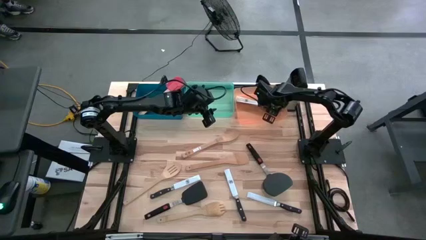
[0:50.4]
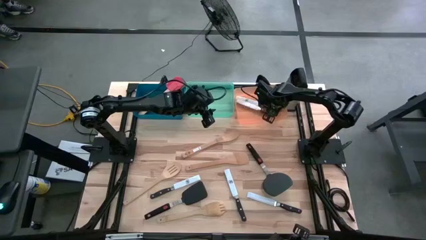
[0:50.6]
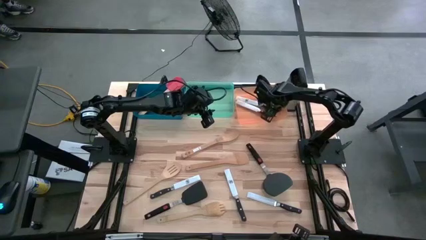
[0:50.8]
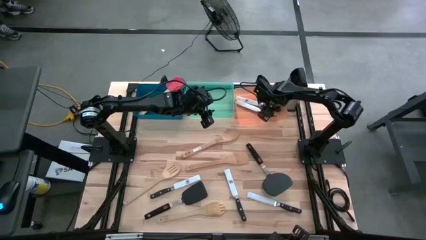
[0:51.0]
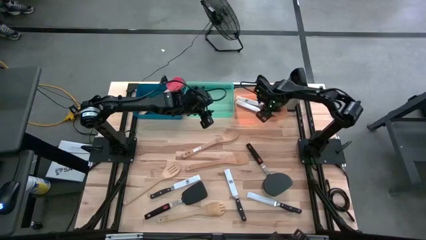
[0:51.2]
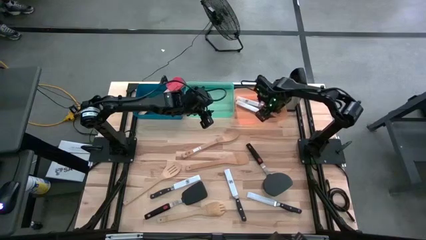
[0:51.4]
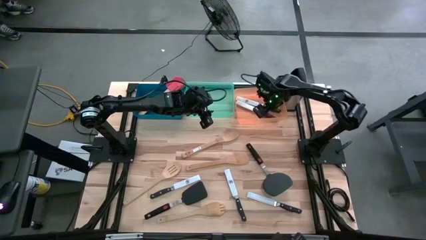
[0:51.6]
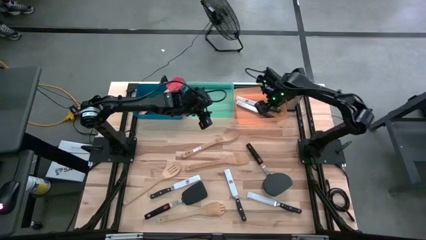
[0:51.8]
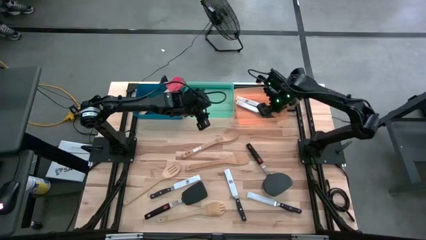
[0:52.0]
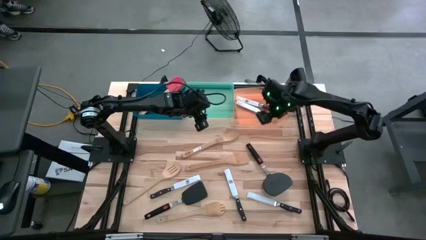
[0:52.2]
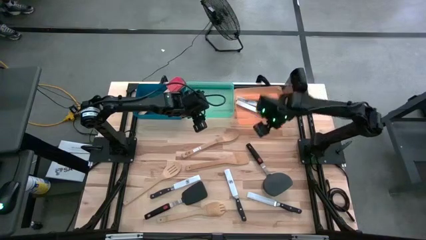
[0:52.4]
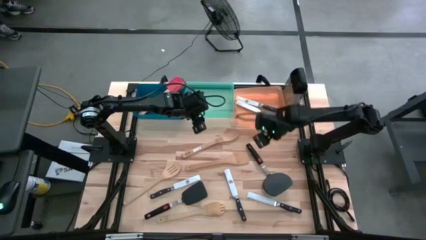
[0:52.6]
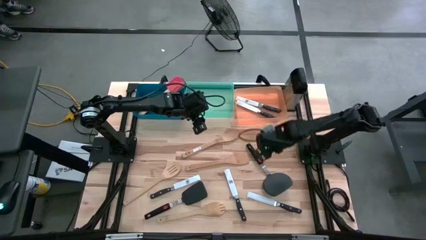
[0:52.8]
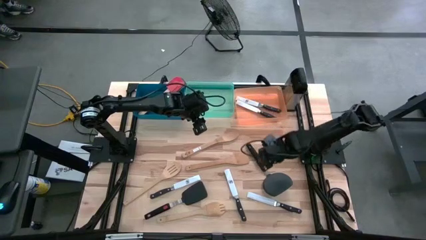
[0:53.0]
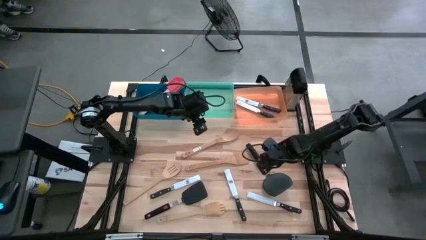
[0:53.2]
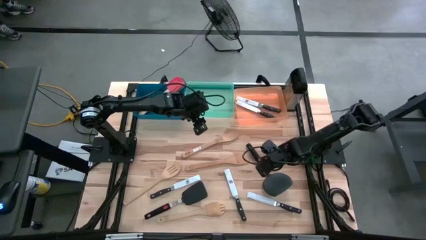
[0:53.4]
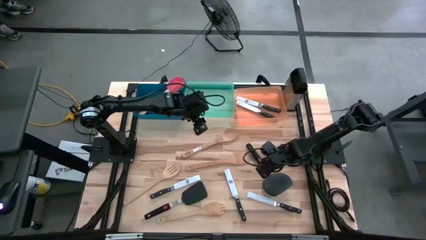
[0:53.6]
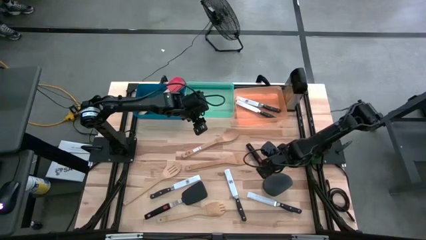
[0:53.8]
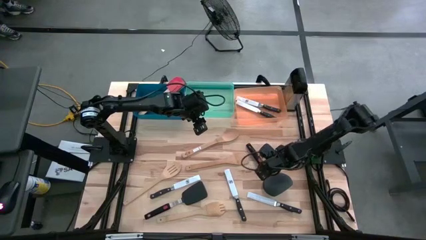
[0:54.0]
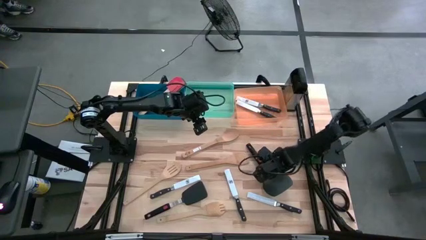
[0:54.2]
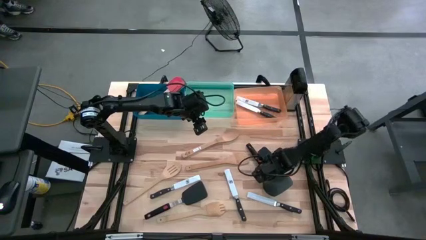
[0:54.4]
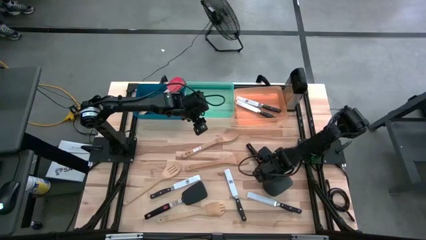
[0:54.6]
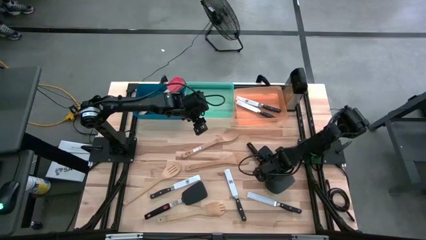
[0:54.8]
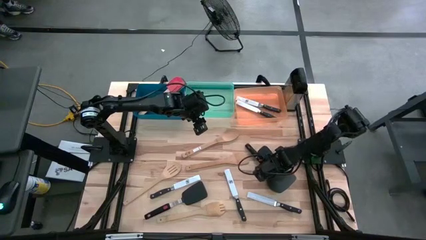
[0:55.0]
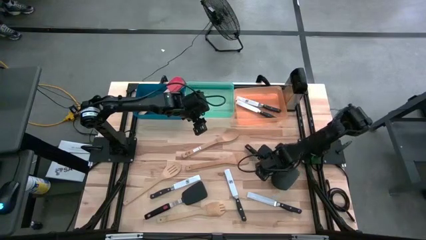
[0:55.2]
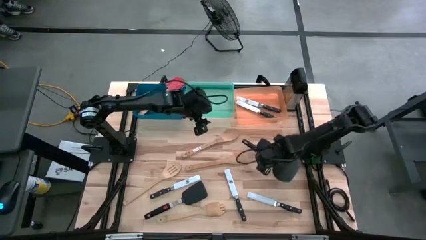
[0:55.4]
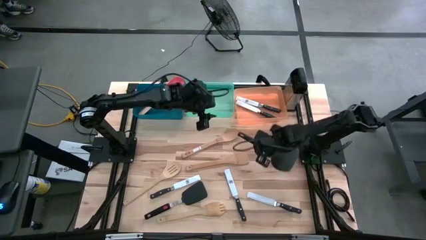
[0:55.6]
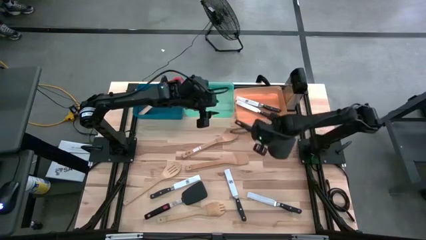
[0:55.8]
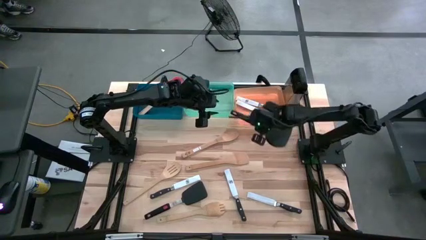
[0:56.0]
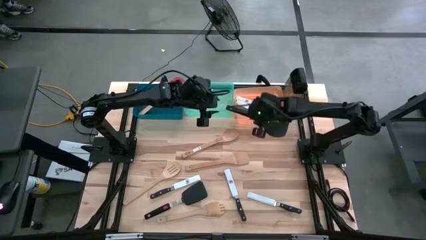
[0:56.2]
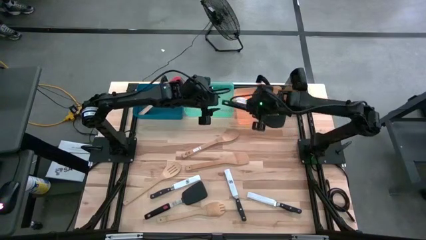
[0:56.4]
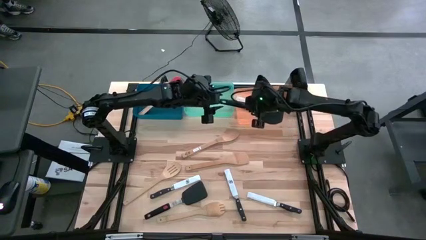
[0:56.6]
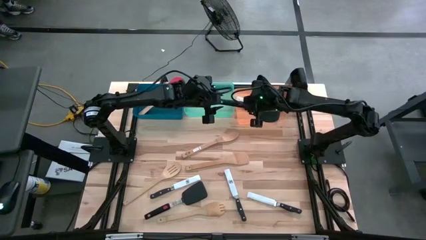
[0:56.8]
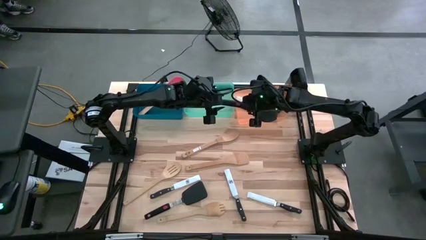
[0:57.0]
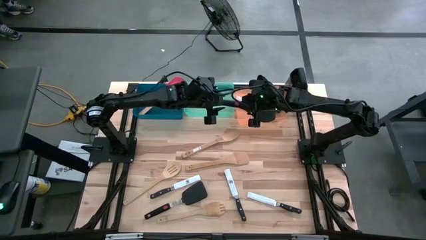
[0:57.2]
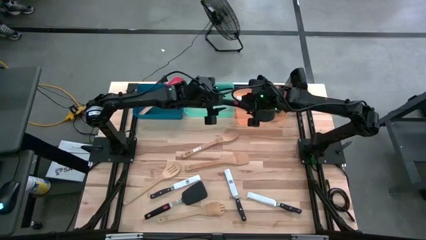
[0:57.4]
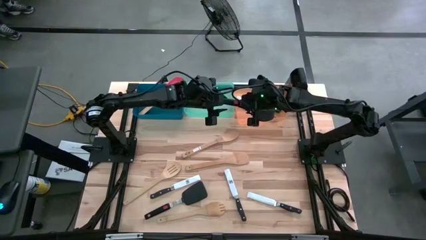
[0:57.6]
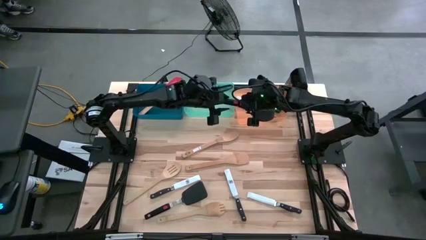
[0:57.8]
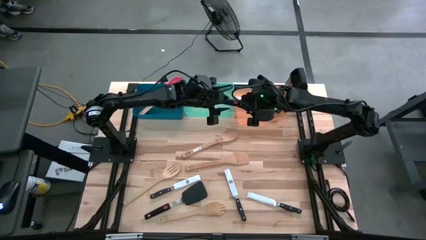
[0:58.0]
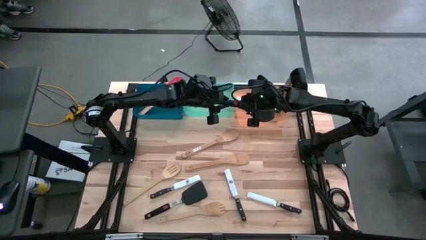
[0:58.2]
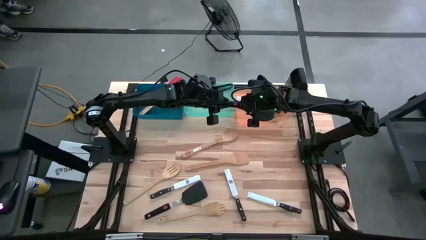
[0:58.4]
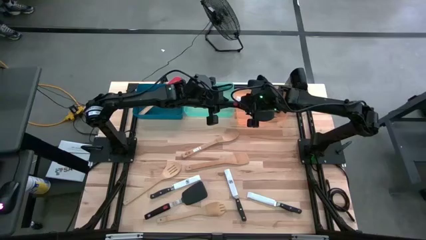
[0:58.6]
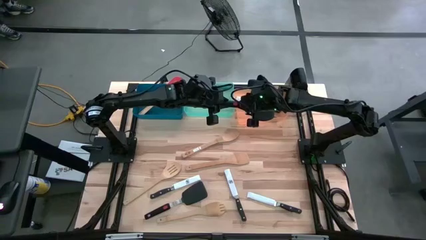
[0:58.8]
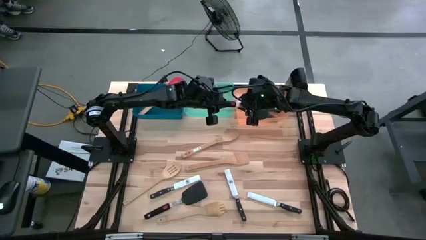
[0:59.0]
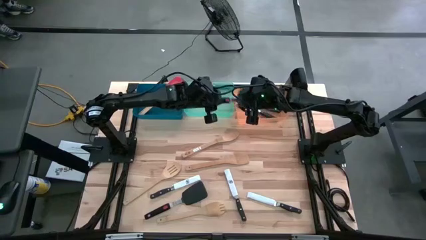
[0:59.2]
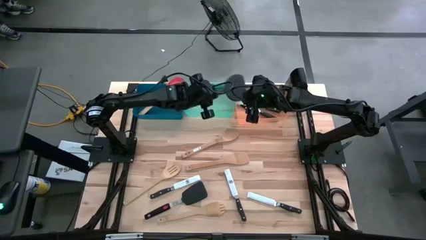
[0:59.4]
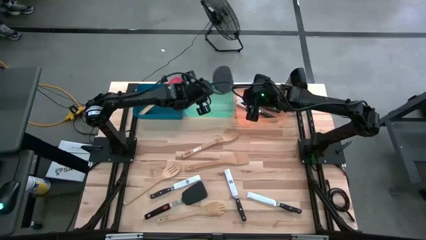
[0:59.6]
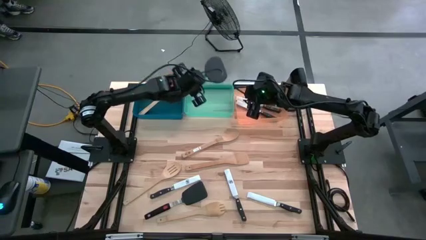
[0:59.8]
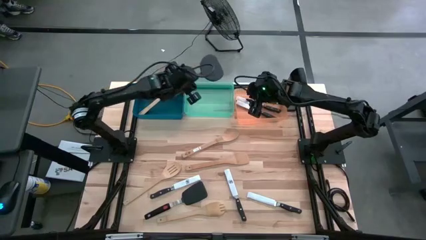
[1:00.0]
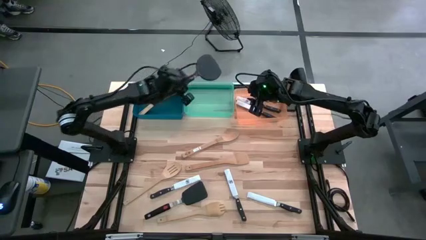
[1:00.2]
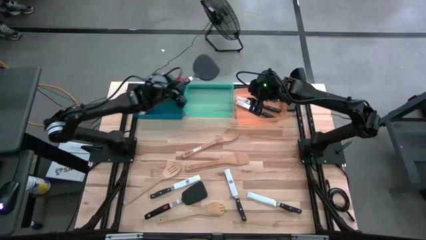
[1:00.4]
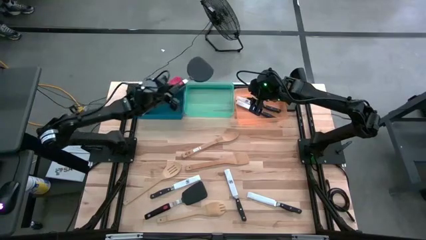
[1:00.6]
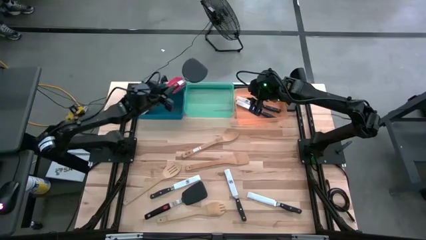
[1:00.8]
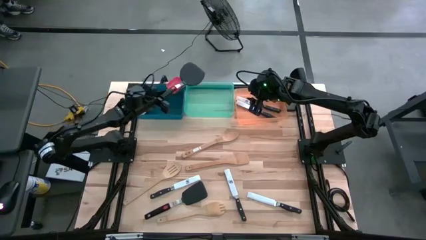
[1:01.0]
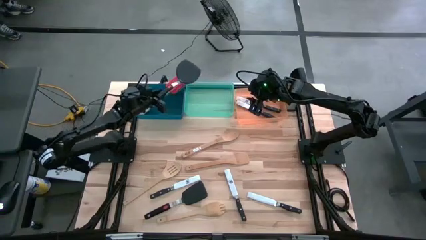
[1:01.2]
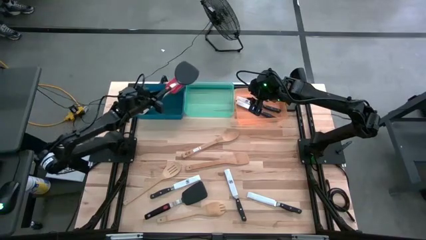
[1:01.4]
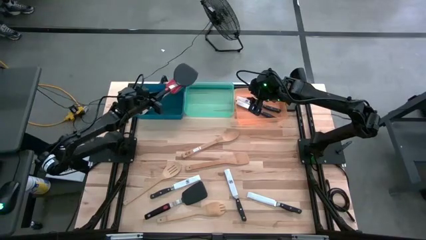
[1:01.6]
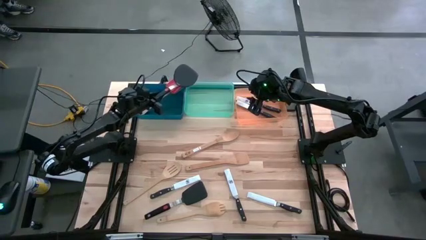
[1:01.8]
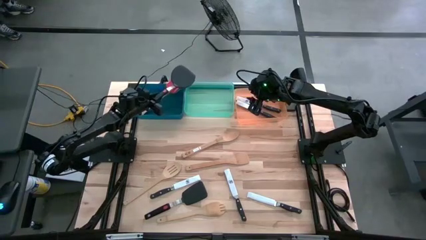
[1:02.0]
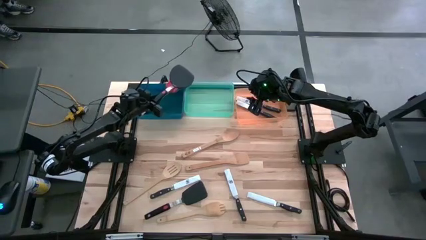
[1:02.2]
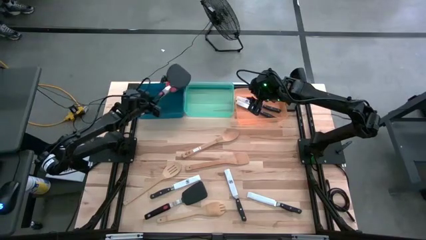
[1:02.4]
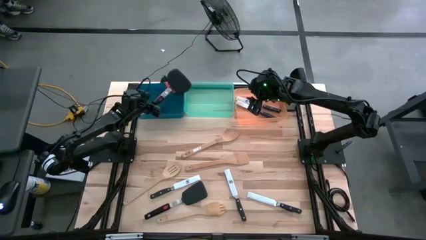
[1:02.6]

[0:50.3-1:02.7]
Task: Pick & Place Kitchen Items
Put the black spatula into the blue bin
